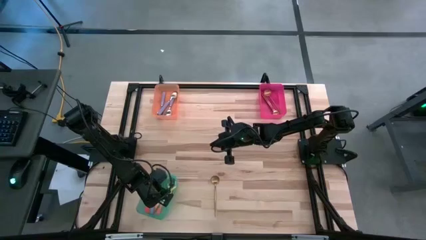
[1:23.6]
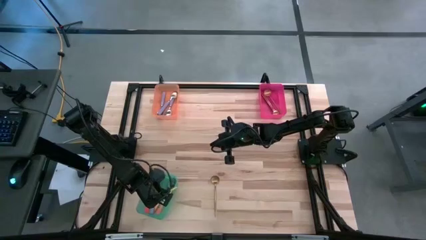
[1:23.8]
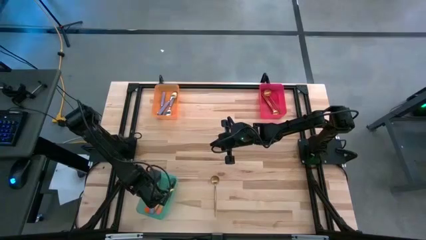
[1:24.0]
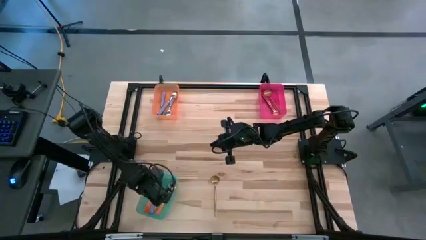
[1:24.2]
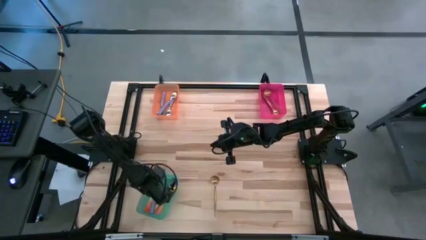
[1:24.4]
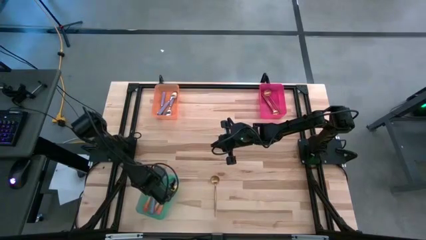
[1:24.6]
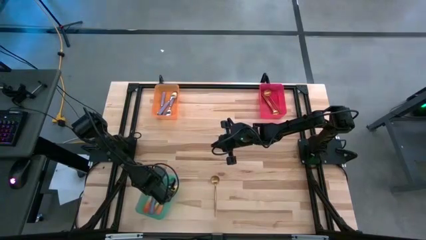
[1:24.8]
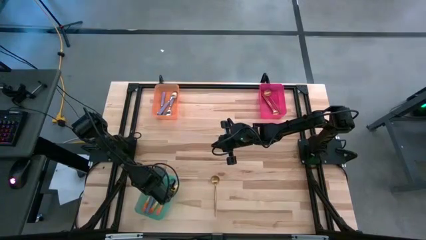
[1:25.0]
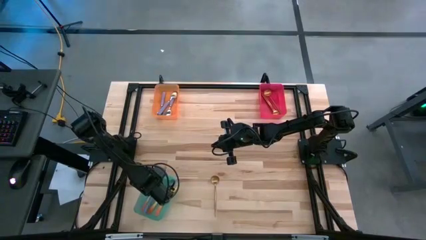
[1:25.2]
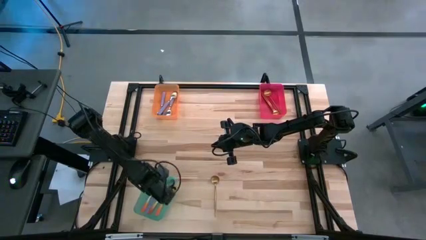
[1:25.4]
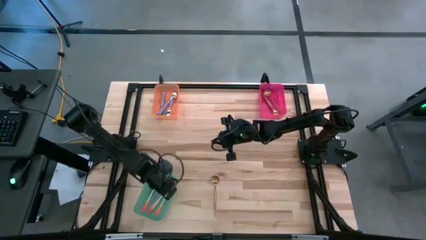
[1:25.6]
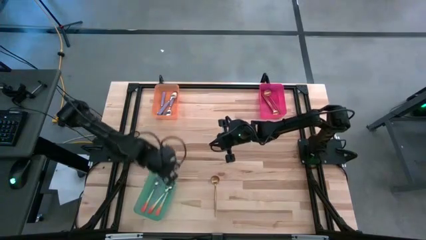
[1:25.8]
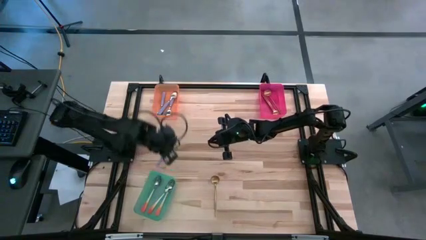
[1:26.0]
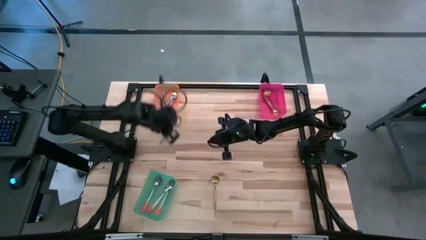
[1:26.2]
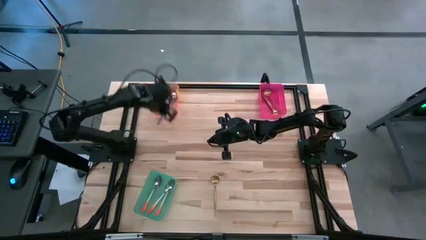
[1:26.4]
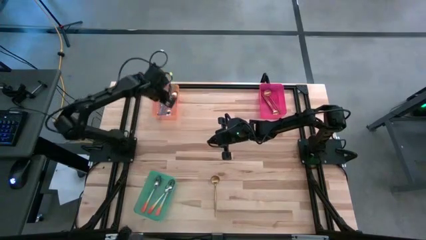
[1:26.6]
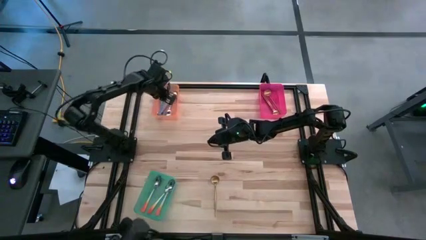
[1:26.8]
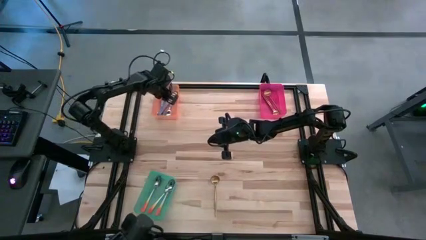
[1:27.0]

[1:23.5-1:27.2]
Task: Sort silverware by color (type)
Put the purple spoon into the orange bin

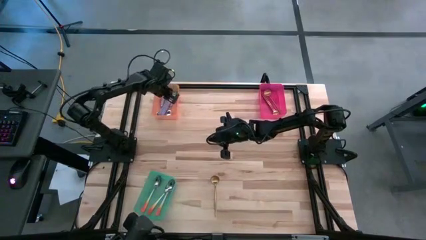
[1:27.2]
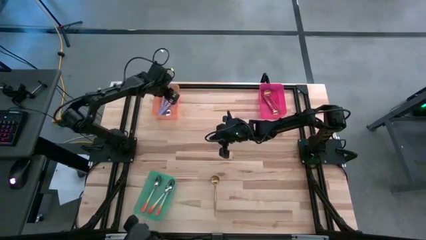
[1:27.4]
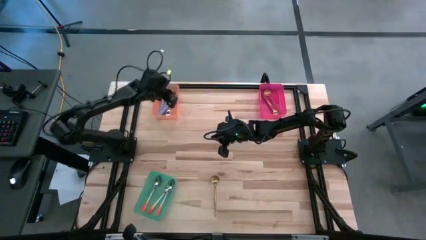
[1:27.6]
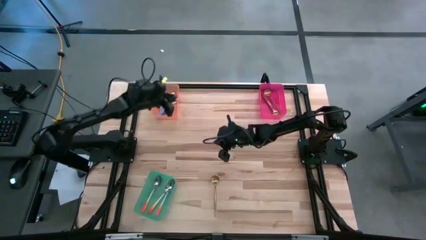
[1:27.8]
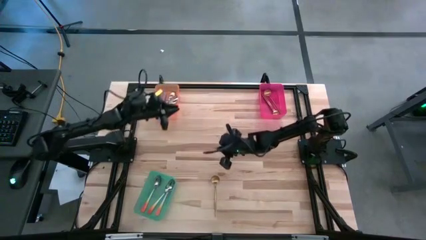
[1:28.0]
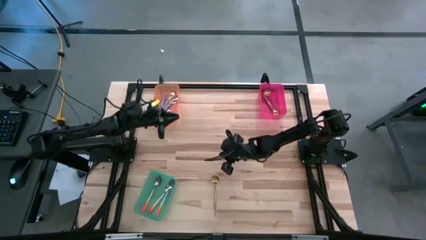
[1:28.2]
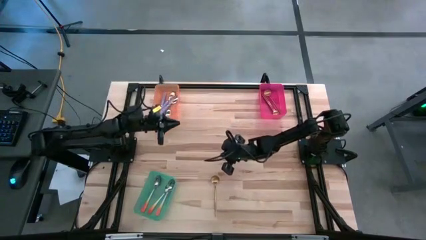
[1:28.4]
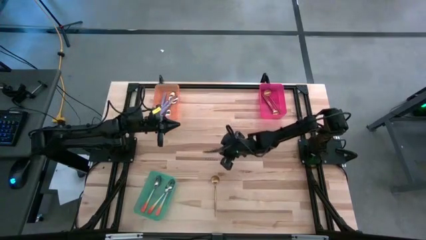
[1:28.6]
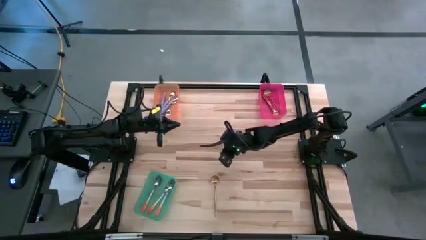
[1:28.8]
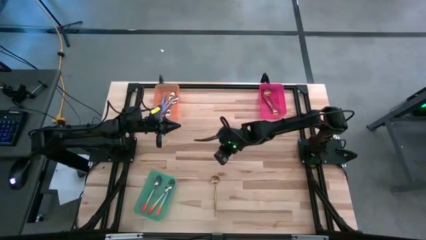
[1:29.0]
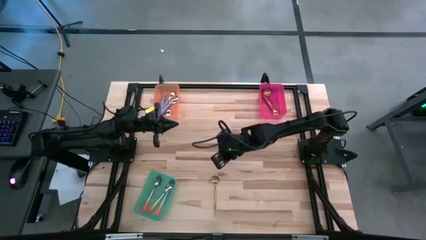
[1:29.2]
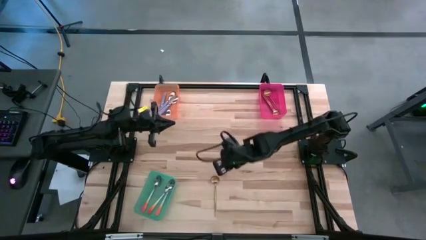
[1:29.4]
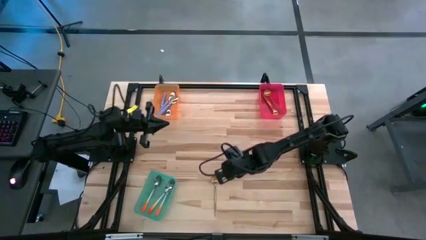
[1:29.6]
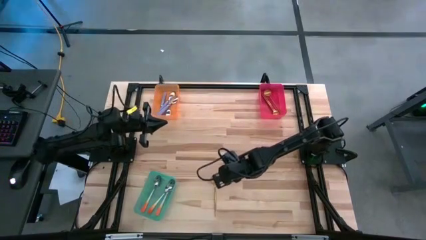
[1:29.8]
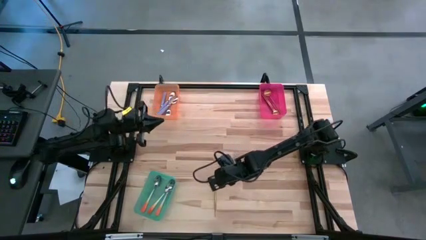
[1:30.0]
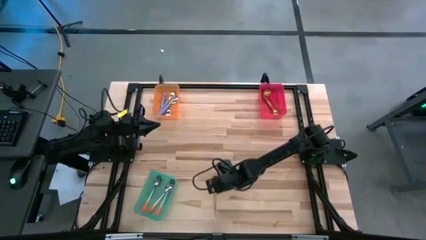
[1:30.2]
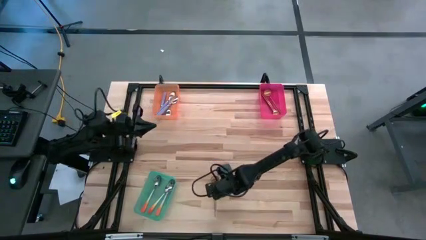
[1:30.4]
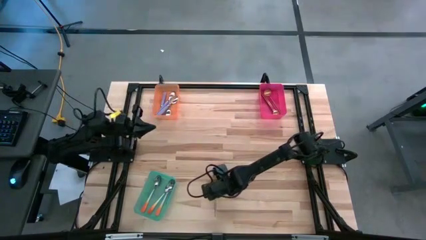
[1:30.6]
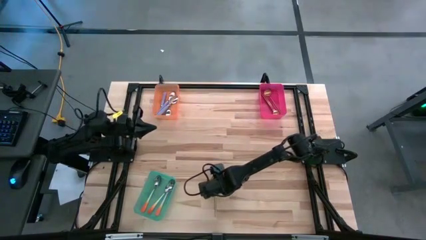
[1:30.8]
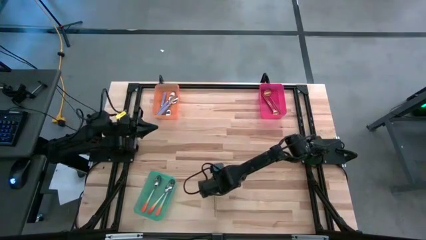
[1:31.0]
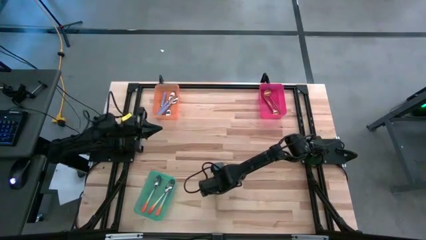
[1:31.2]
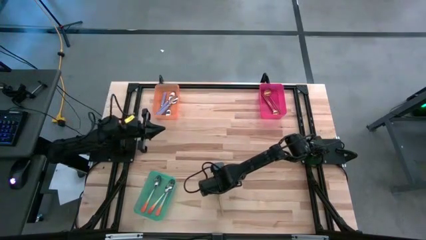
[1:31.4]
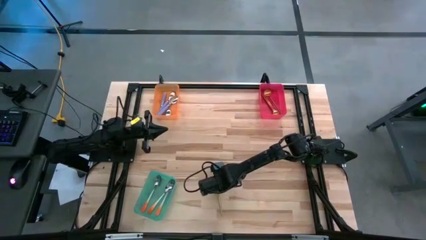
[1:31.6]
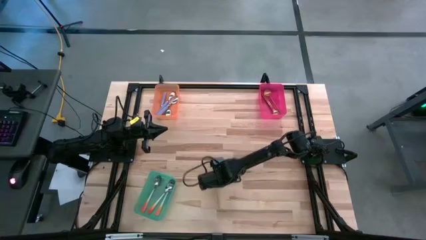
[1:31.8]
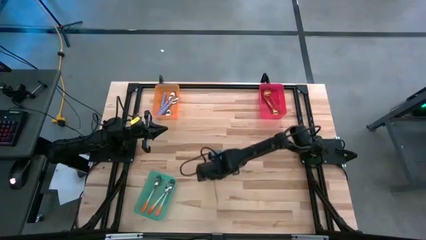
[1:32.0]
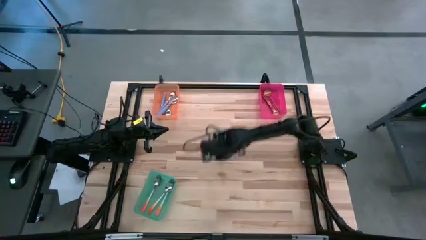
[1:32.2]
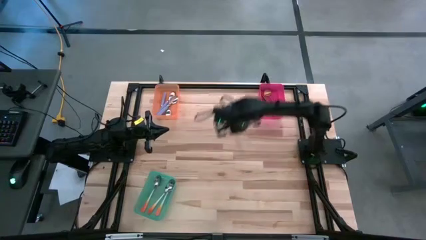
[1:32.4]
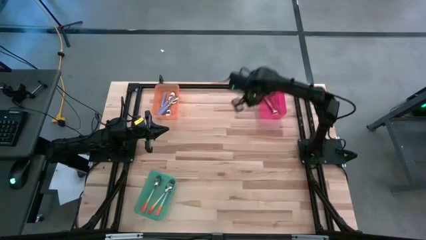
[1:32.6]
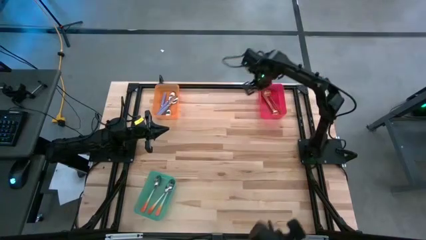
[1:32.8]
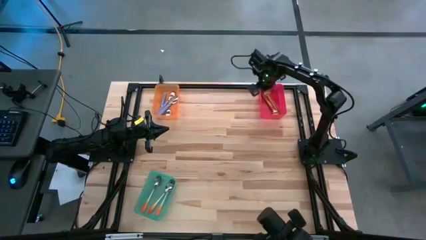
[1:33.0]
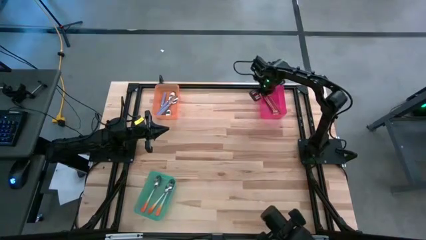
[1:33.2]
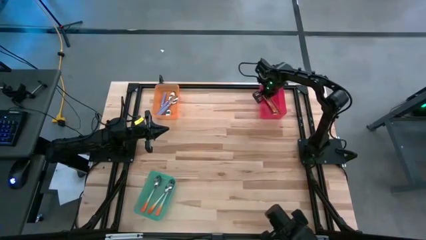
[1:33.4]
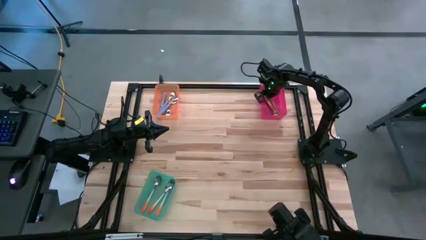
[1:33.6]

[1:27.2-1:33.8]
Put the gold spoon into the pink bin

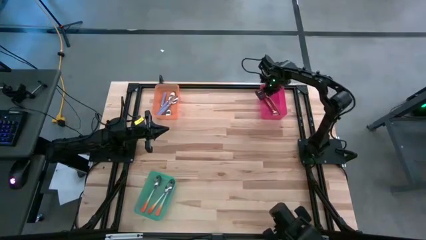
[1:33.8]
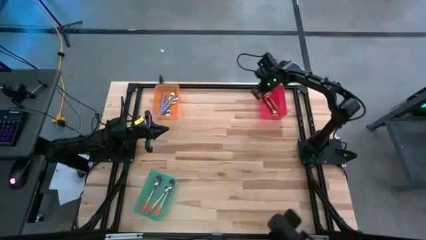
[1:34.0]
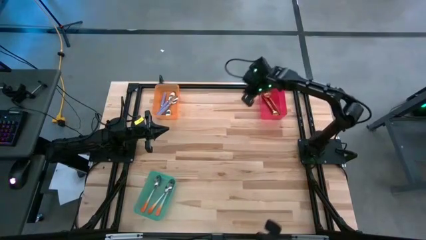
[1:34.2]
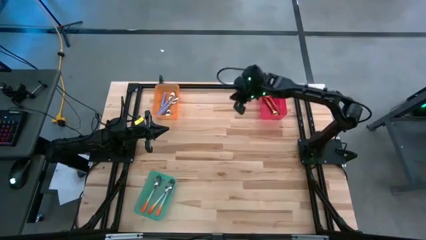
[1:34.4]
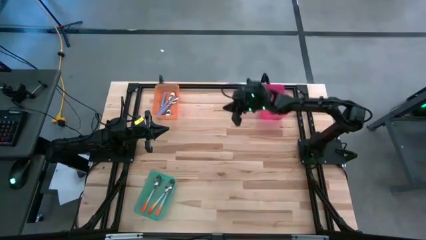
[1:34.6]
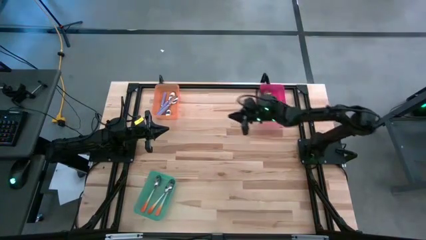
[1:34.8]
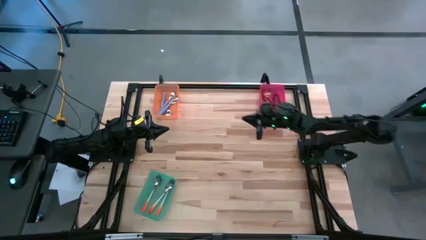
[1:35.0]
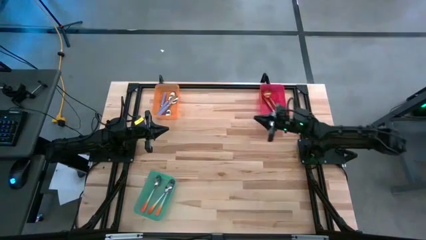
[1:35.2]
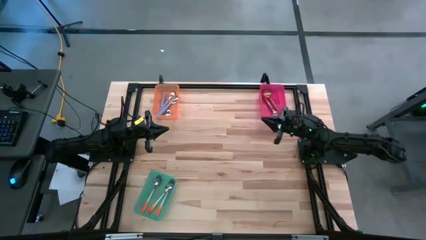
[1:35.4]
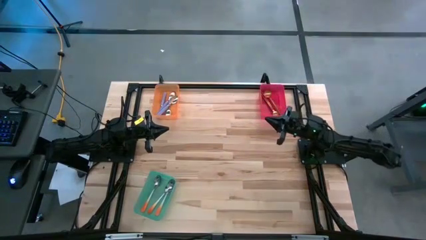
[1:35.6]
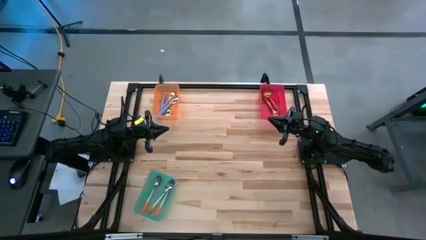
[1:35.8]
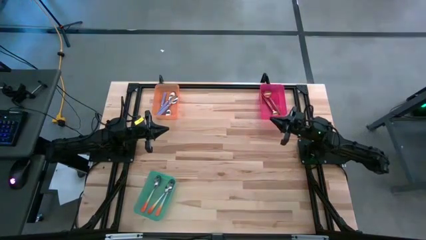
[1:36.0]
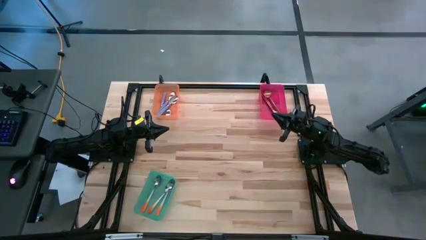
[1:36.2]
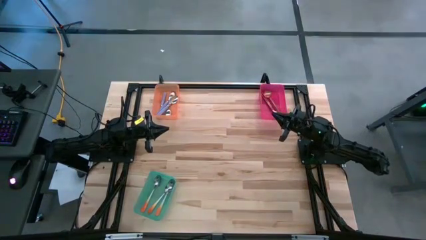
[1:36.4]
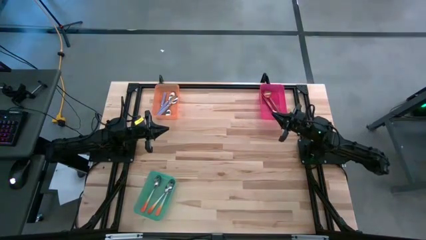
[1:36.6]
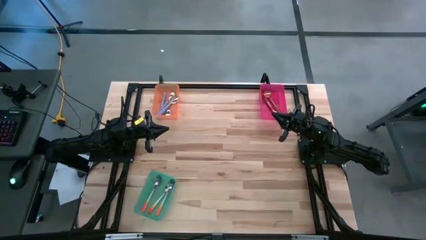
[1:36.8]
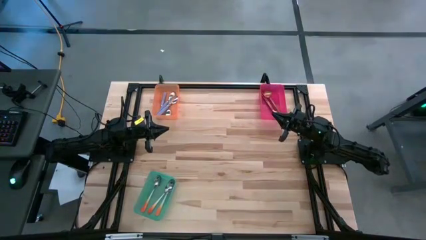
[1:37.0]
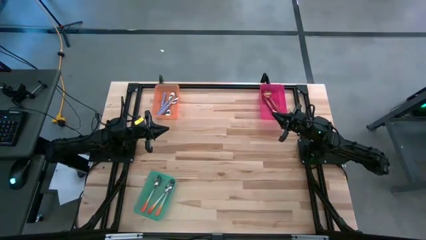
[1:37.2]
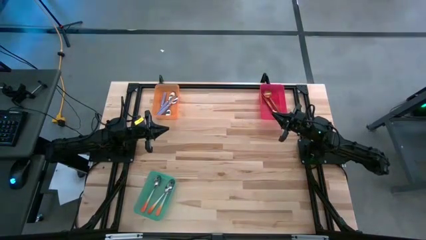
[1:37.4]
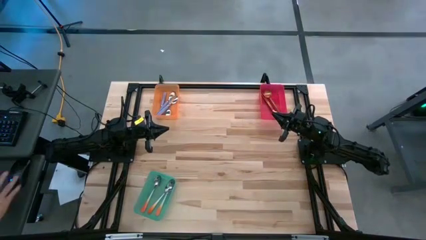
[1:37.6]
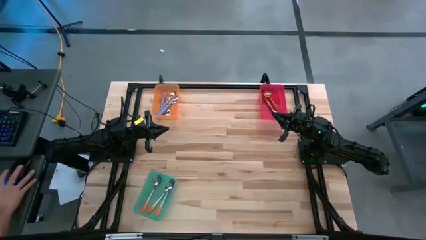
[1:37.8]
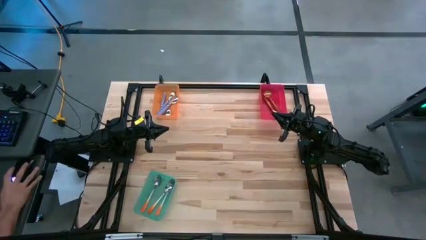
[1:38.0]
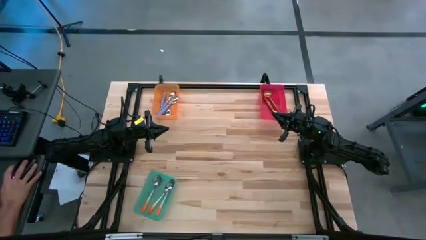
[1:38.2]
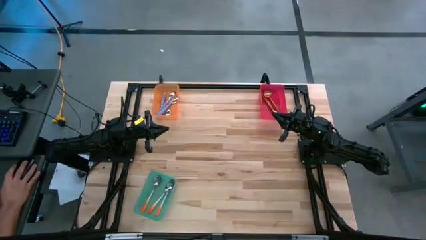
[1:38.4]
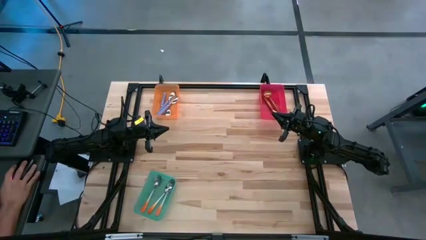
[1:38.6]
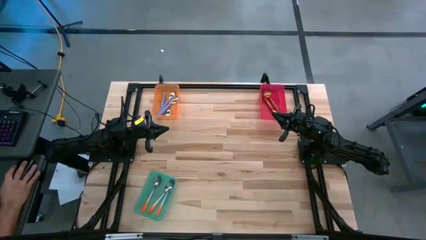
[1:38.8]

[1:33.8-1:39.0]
Return to Home Position

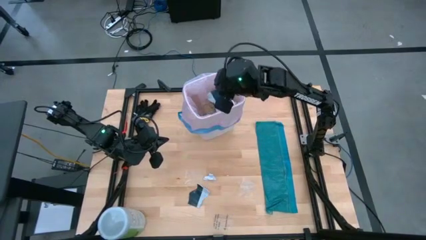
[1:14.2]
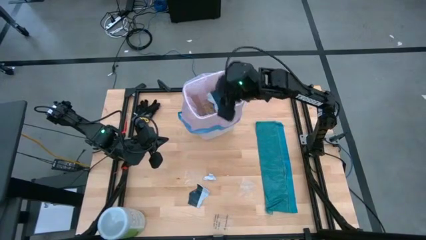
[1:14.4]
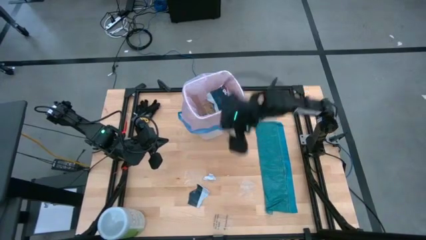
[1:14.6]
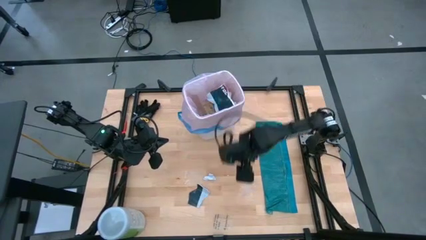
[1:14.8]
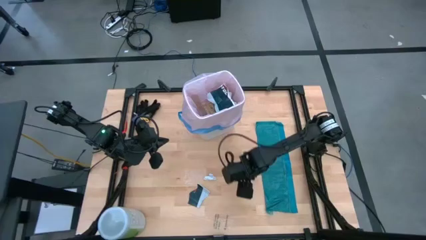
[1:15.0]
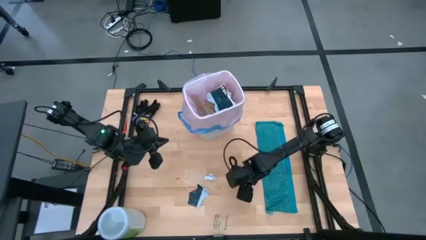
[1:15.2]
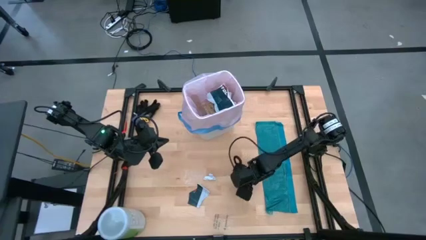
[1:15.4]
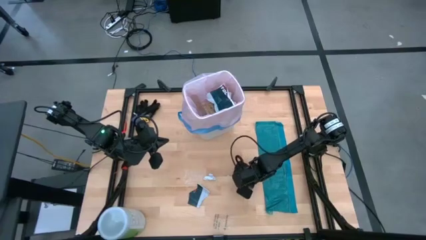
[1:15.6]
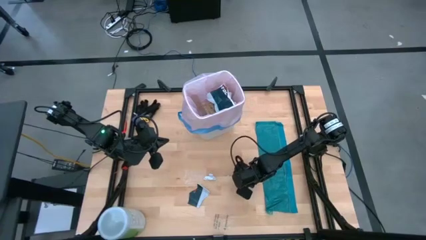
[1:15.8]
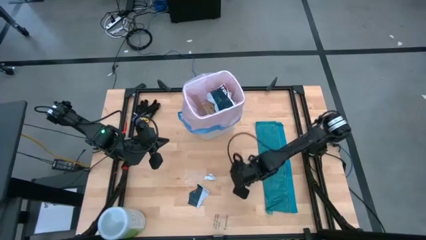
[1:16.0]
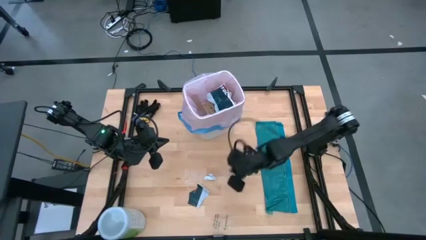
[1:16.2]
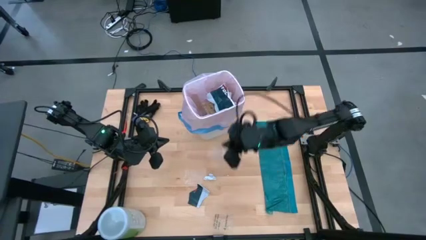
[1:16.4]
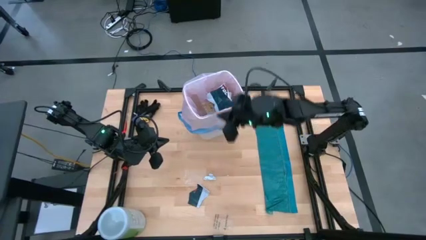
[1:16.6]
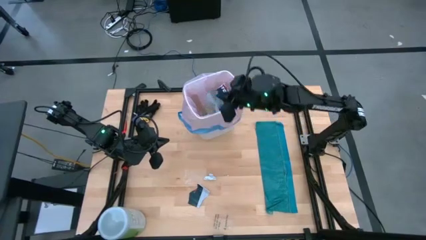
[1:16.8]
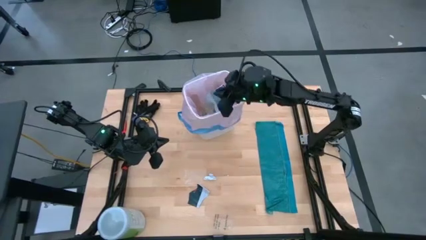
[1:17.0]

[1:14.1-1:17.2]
Task: place trash/remove bag and relplace
Put the transparent plastic into the white trash bin
